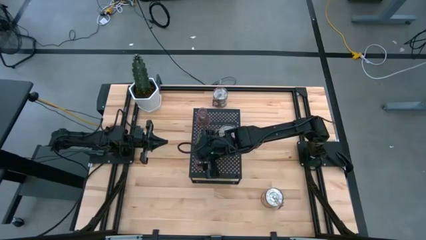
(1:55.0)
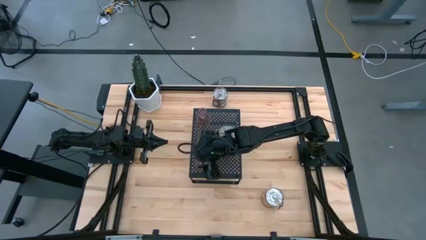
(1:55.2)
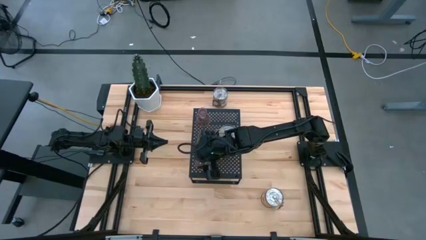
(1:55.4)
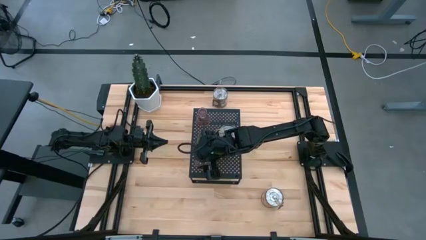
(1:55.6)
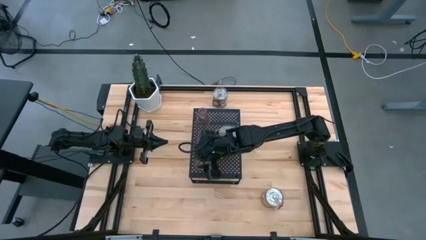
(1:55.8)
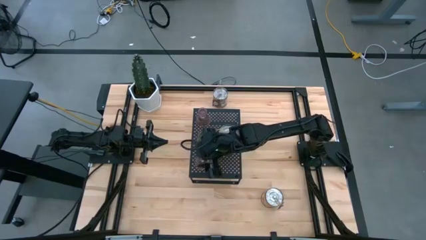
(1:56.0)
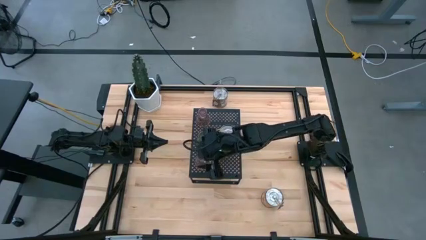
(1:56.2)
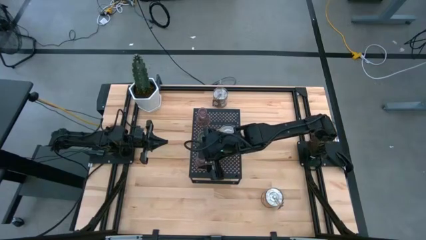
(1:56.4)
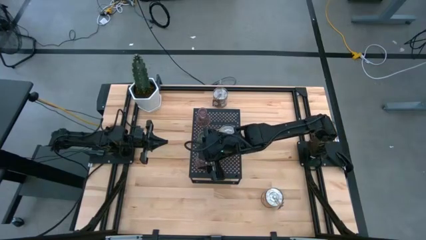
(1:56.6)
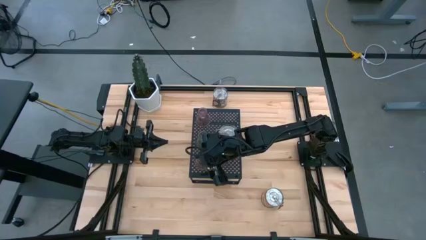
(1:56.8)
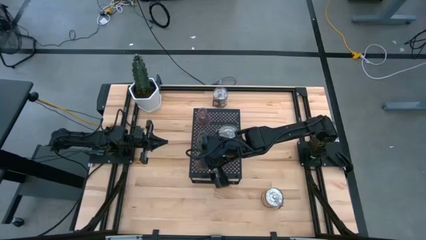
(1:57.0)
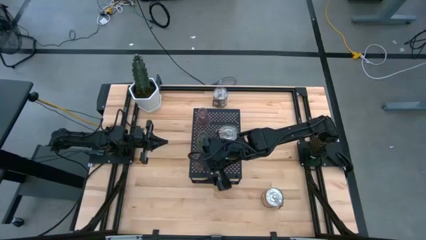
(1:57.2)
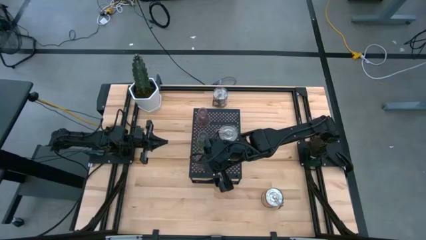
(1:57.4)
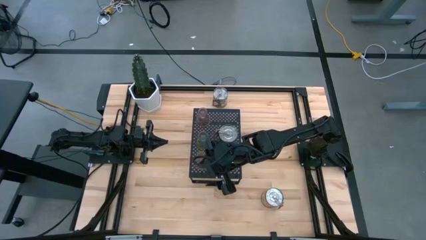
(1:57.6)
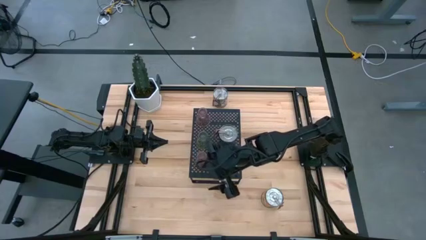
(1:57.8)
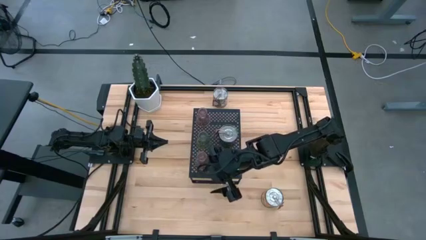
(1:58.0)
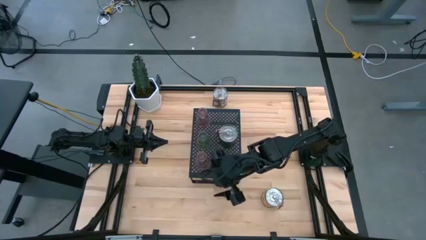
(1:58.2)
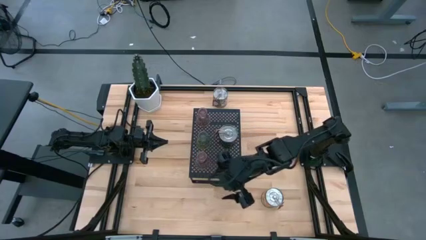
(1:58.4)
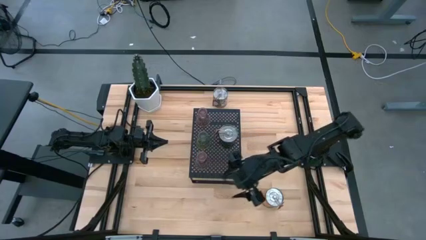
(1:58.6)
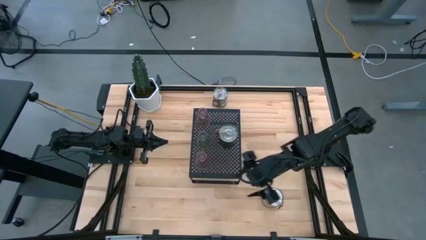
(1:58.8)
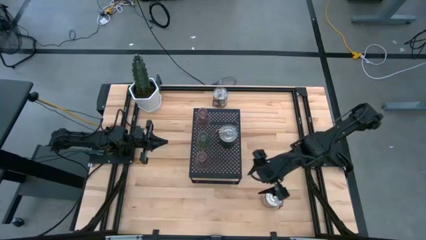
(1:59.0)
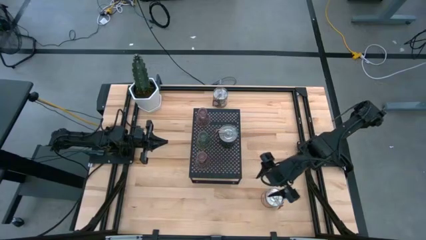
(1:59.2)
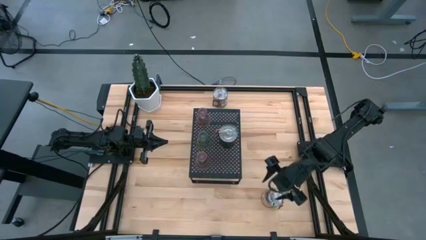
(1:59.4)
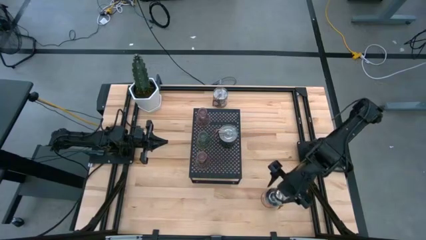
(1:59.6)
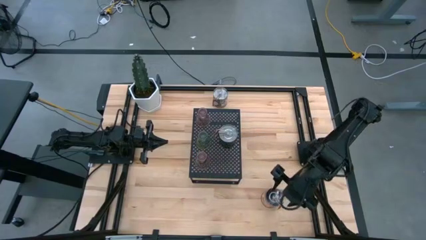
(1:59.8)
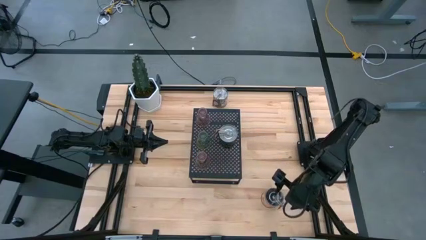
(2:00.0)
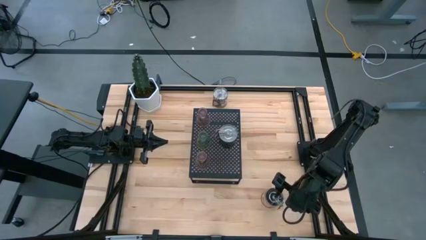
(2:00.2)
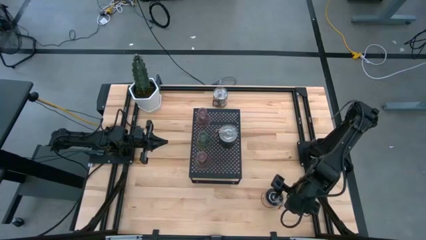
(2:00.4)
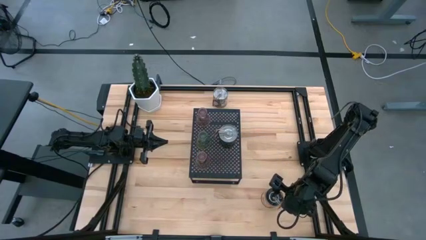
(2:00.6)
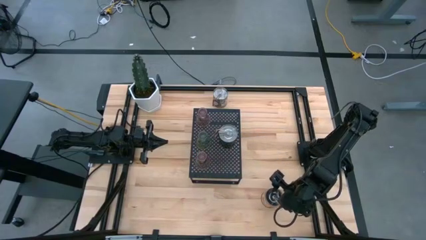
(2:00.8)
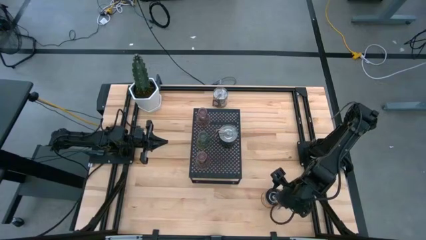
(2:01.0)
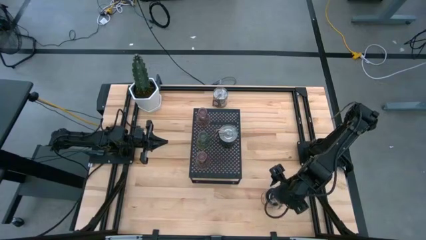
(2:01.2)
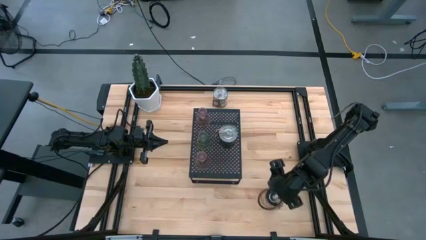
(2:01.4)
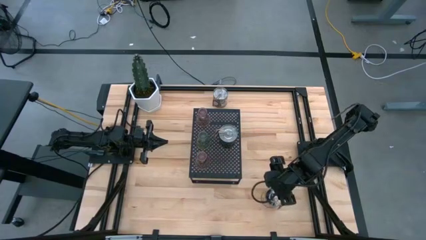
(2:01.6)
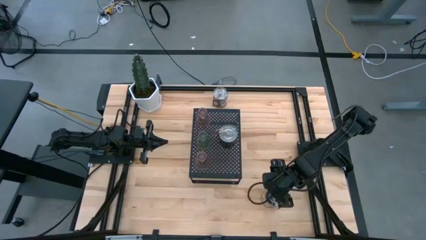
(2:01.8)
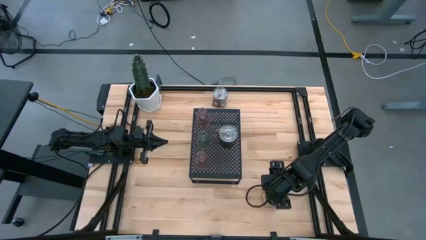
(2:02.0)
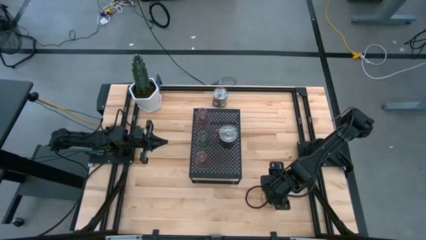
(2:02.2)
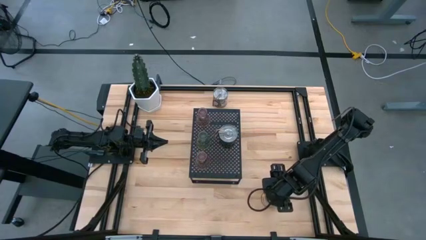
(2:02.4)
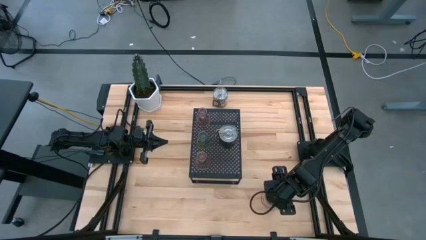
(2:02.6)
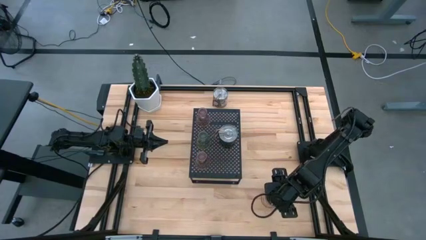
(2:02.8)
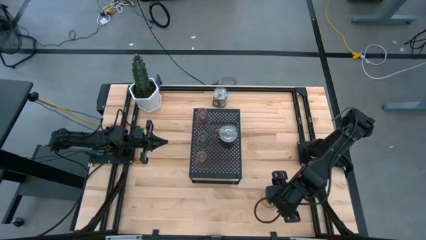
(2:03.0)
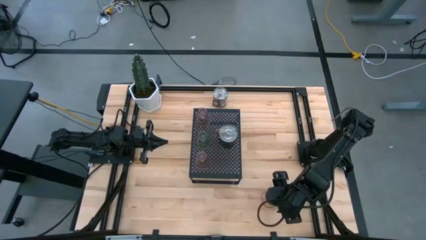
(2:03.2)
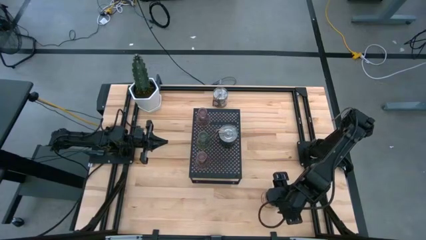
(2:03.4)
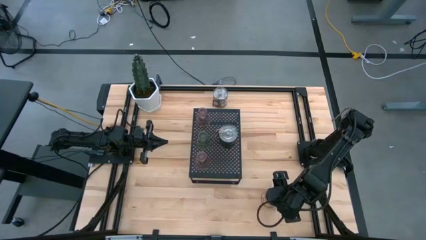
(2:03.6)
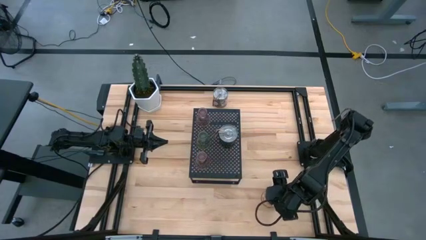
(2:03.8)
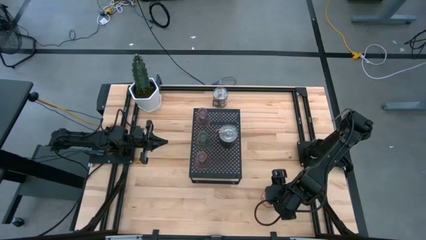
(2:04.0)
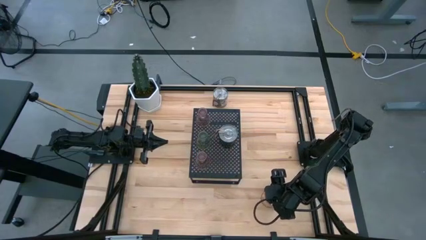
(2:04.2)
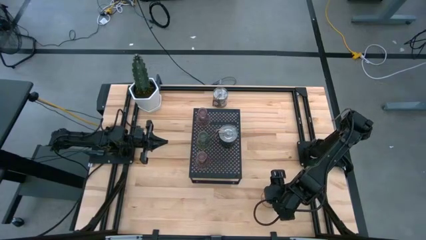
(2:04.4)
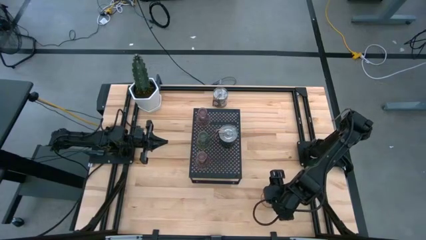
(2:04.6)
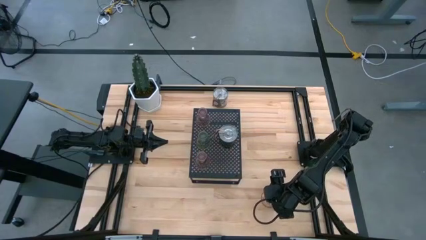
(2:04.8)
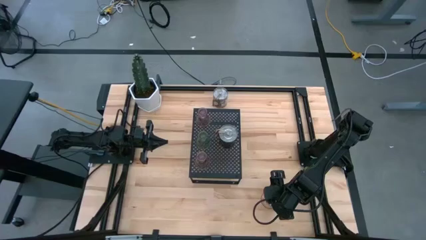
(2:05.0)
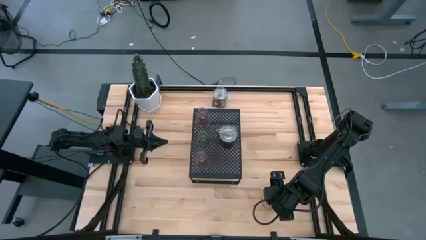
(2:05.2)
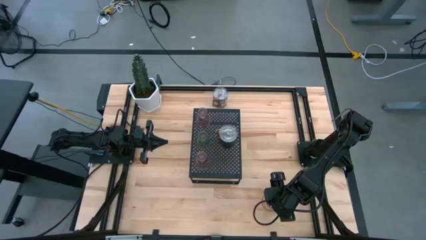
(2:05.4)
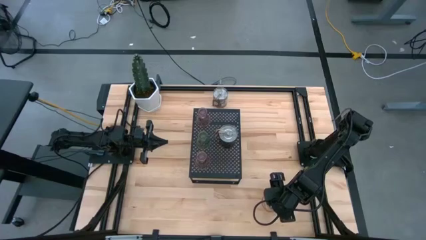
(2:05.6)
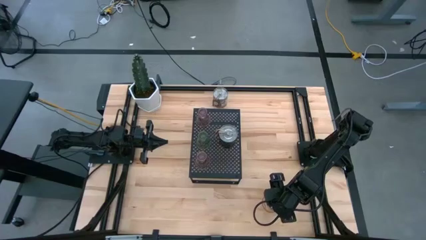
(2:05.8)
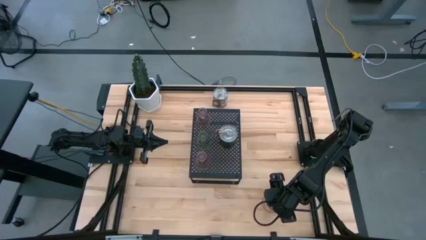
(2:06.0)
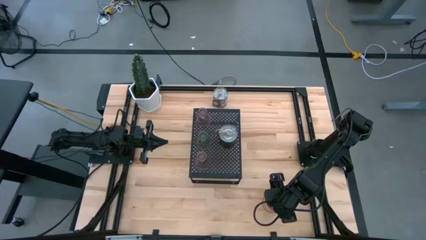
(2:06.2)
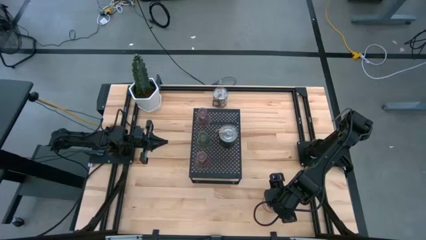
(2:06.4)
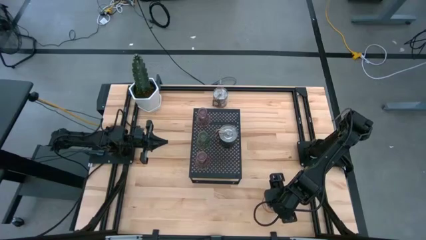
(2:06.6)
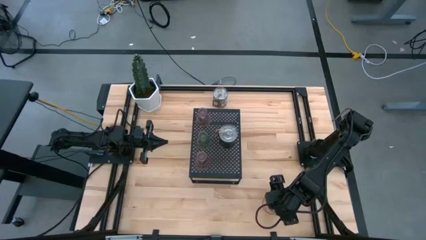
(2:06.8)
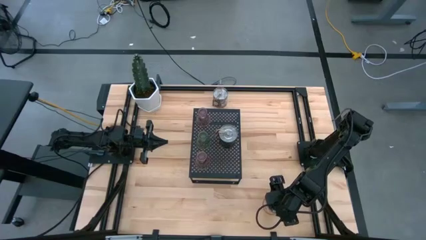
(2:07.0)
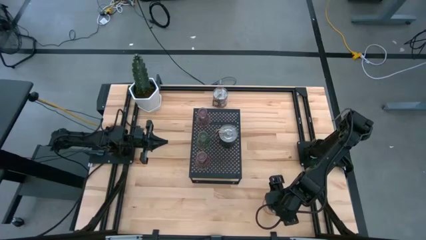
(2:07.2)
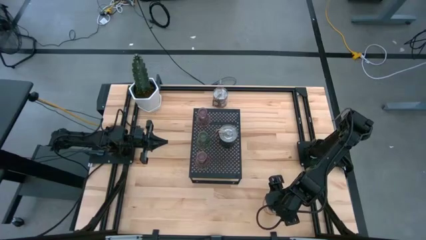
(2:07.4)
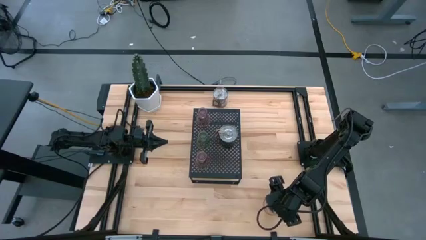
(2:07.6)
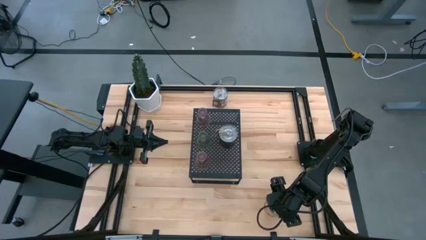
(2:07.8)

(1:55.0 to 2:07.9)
Task: Pick & Place candle stick holders
Put the bottom brown scented candle on the shelf

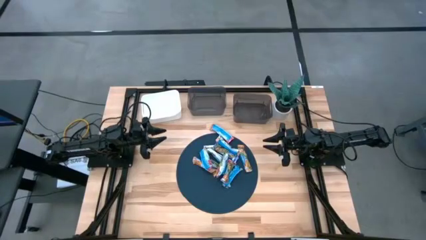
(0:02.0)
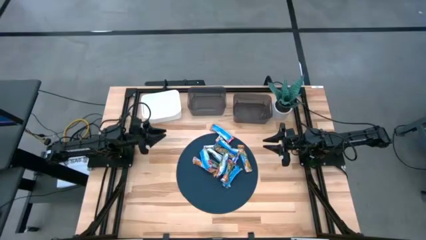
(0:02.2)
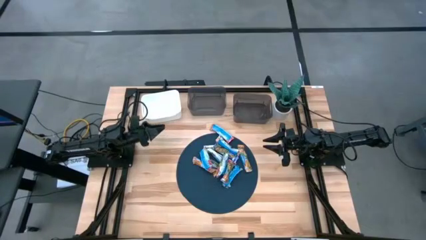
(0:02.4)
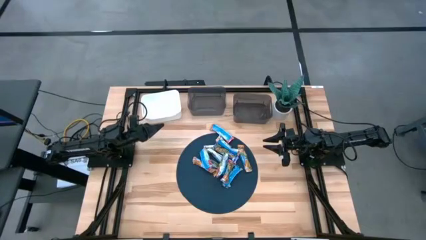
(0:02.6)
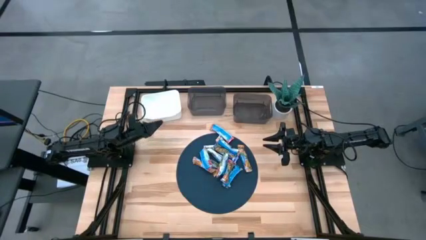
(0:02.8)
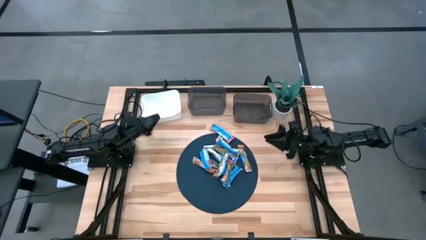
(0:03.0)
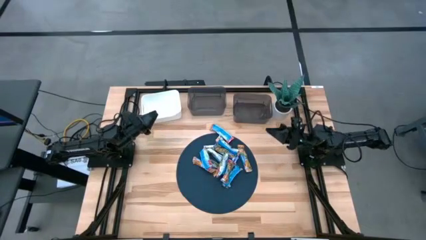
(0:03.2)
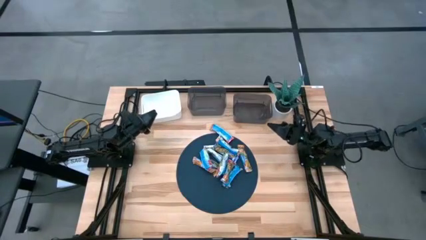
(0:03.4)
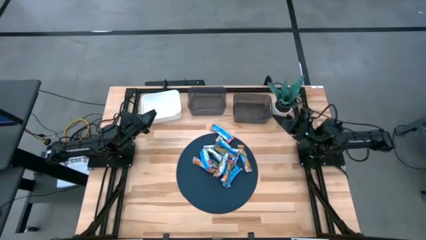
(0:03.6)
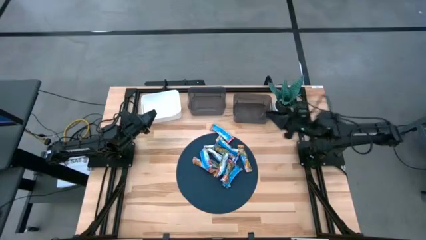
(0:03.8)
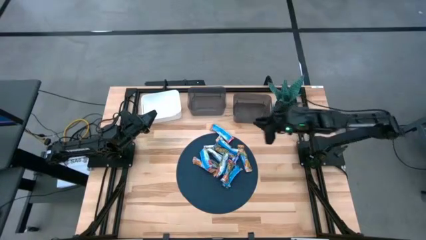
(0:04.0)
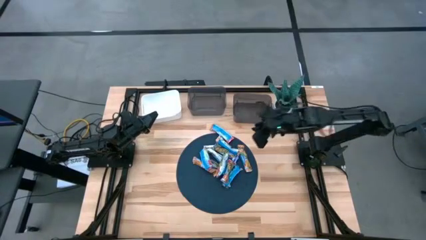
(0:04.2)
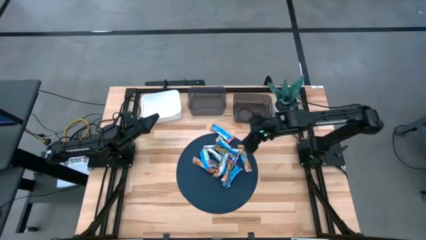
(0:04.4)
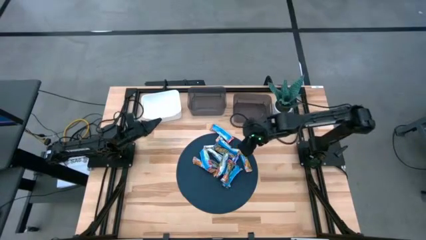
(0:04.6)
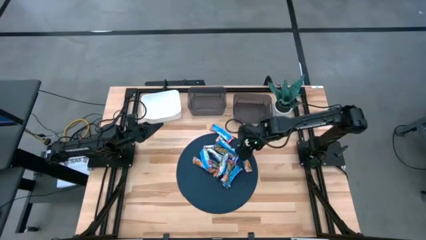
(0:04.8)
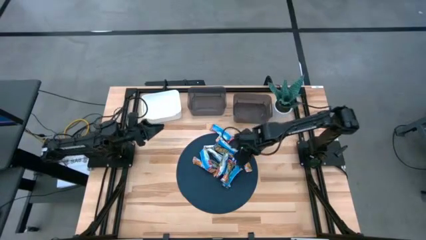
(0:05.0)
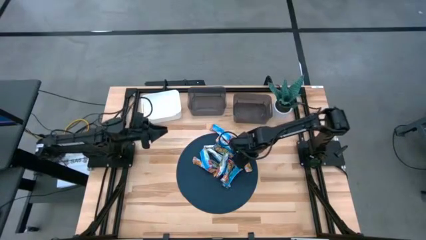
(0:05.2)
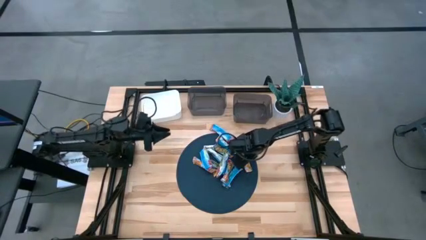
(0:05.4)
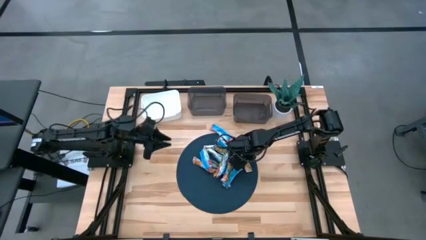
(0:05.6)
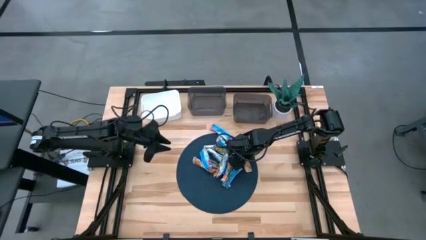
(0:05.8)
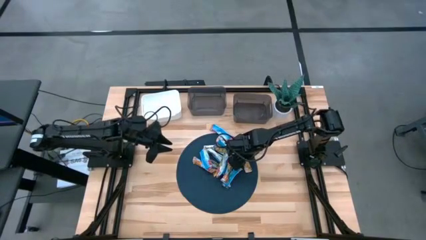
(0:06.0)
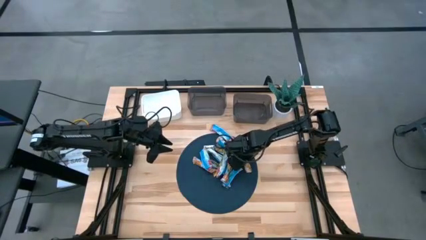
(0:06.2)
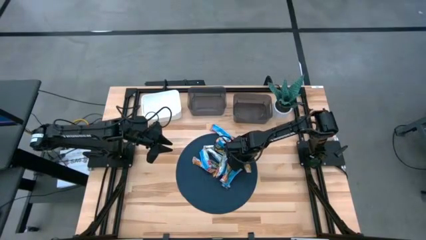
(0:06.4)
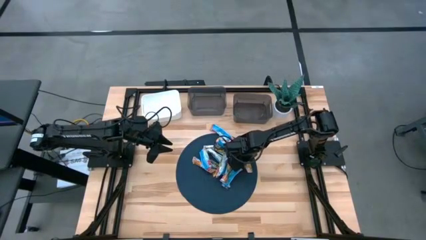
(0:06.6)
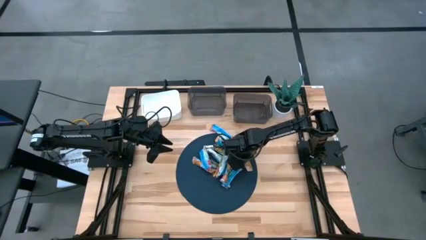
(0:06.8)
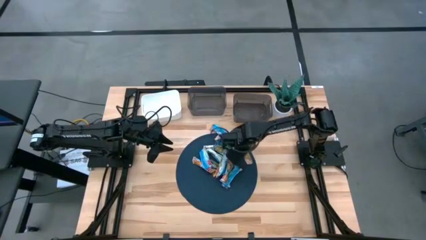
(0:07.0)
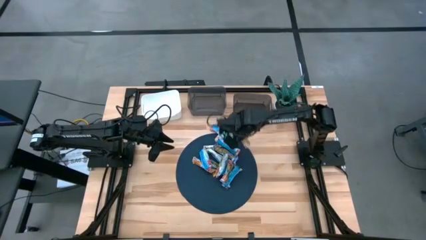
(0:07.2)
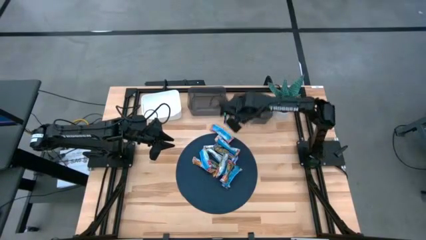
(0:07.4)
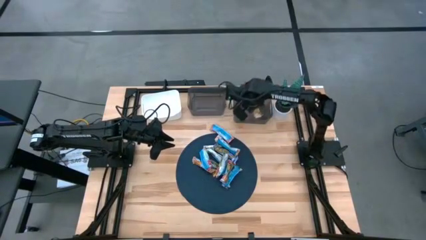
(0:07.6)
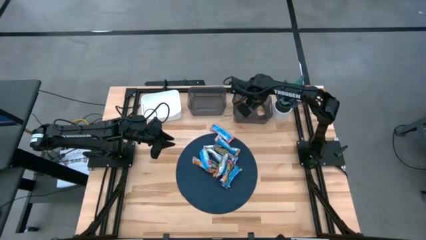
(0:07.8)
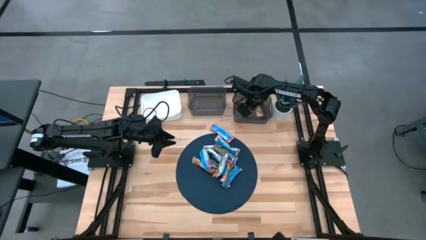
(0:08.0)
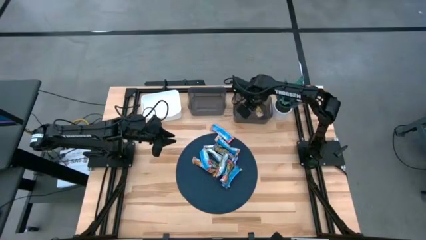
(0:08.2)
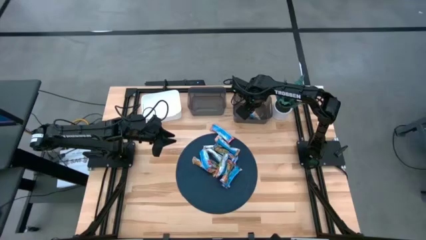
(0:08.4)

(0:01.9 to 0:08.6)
Task: Pick and place Granola Bars by type
Put the yellow granola bar into the right black bin
